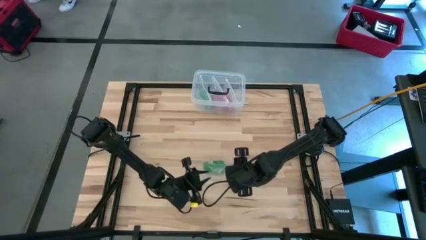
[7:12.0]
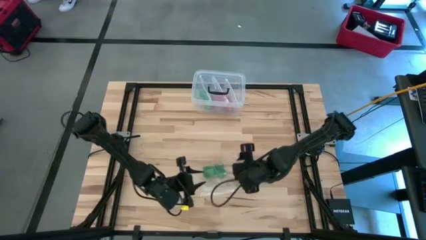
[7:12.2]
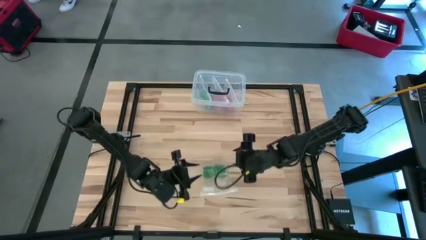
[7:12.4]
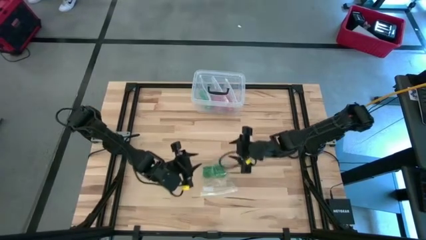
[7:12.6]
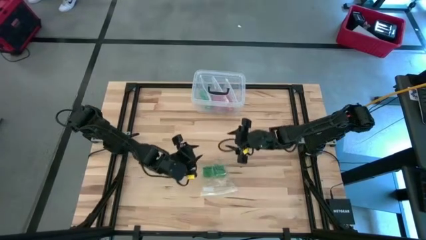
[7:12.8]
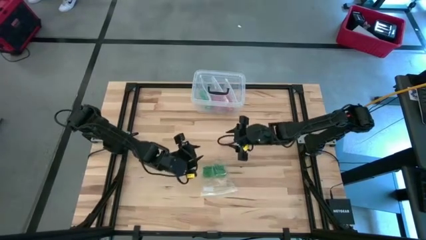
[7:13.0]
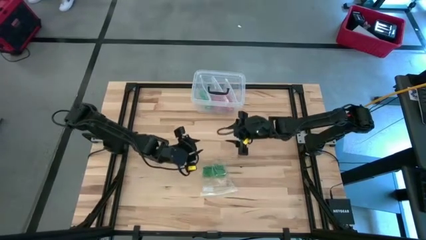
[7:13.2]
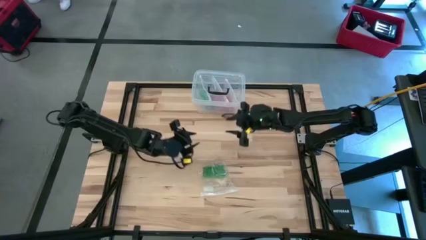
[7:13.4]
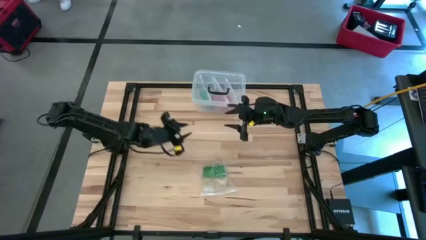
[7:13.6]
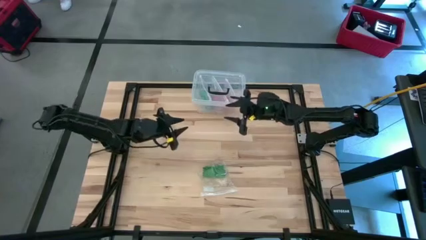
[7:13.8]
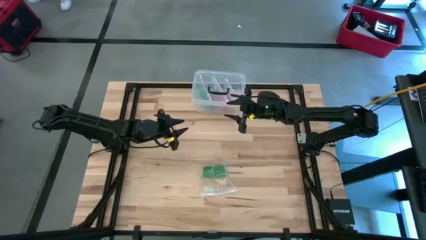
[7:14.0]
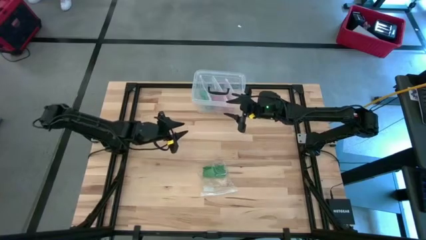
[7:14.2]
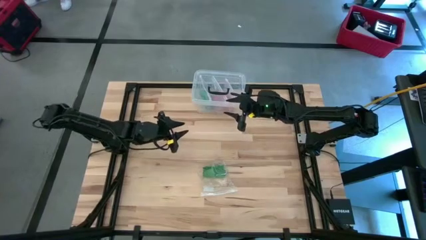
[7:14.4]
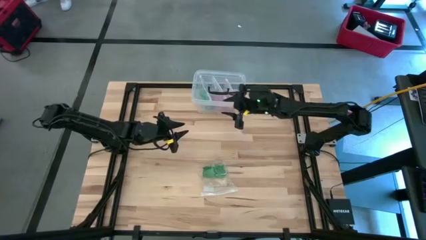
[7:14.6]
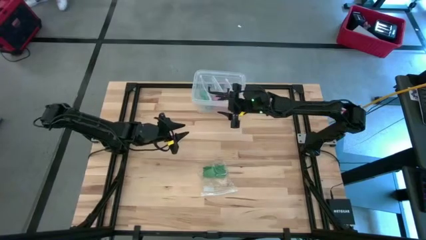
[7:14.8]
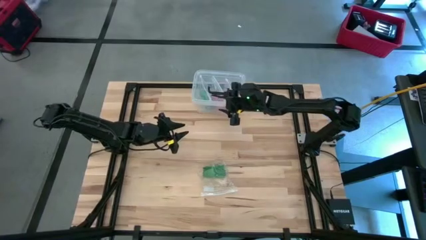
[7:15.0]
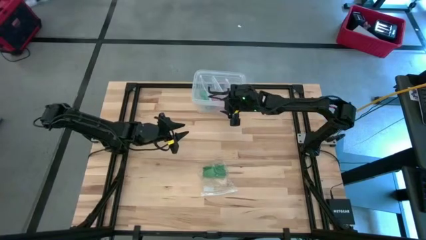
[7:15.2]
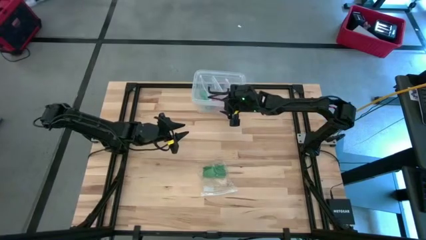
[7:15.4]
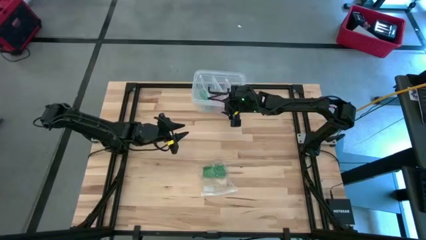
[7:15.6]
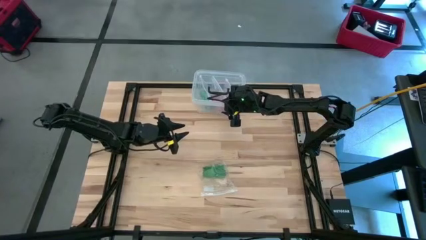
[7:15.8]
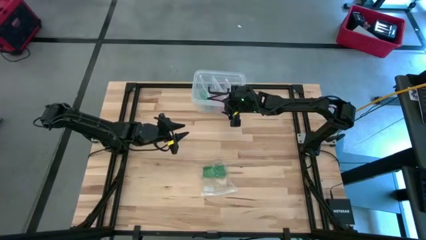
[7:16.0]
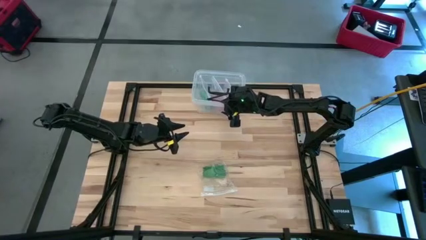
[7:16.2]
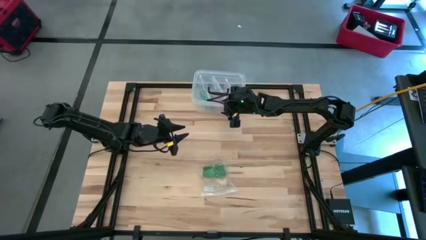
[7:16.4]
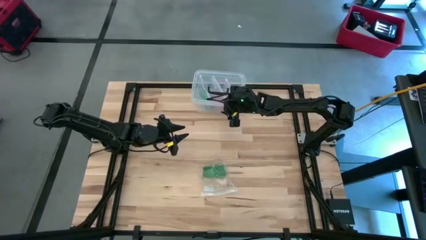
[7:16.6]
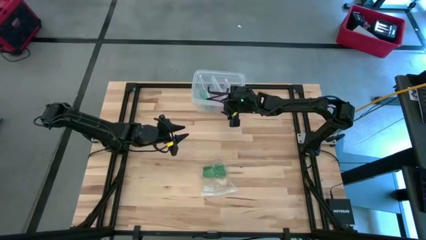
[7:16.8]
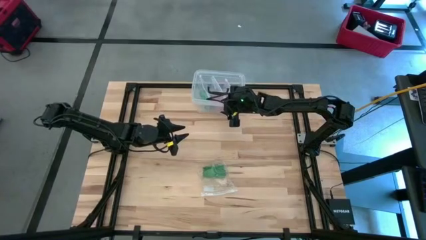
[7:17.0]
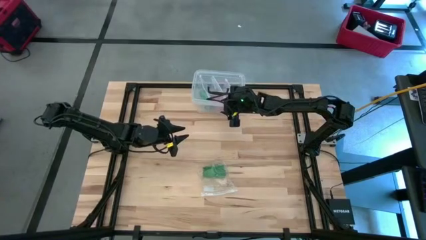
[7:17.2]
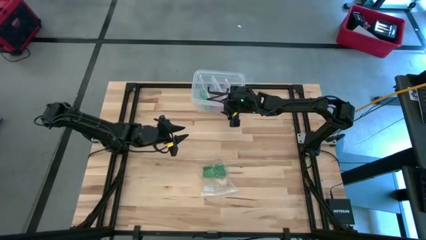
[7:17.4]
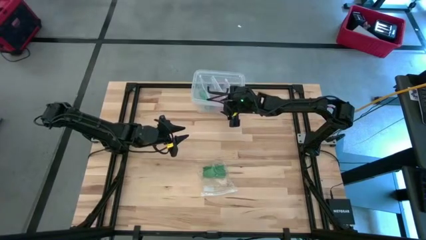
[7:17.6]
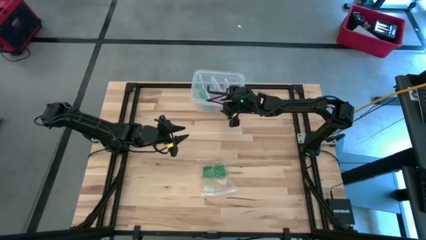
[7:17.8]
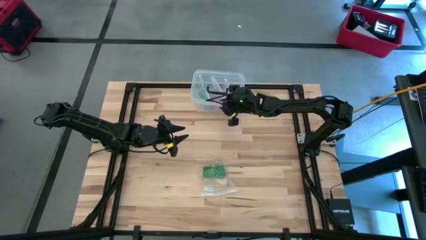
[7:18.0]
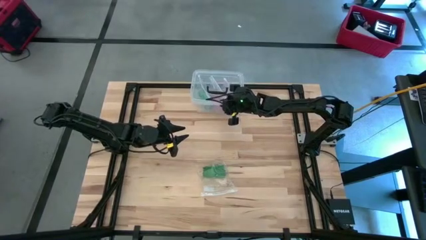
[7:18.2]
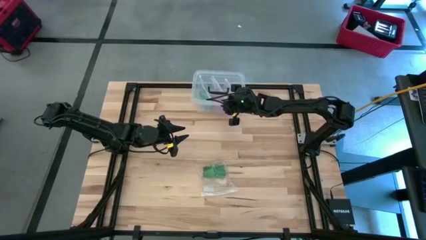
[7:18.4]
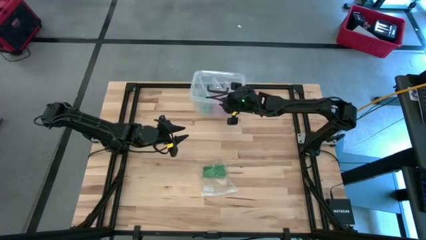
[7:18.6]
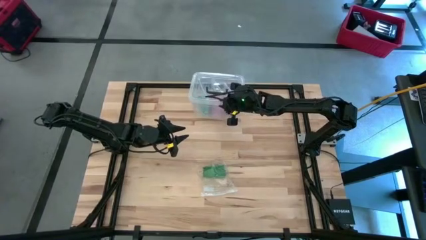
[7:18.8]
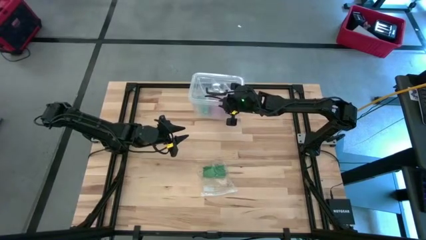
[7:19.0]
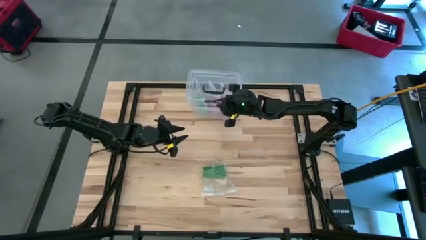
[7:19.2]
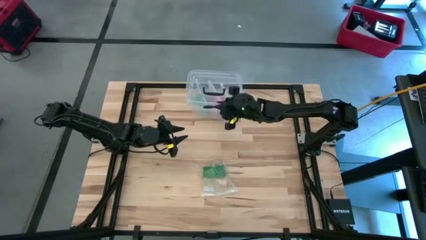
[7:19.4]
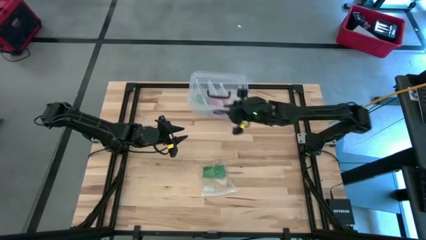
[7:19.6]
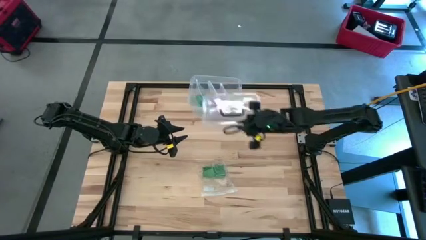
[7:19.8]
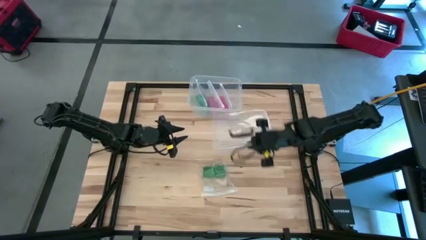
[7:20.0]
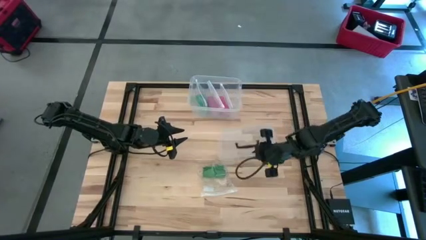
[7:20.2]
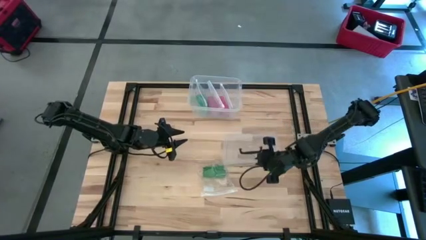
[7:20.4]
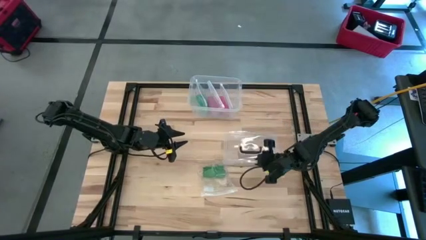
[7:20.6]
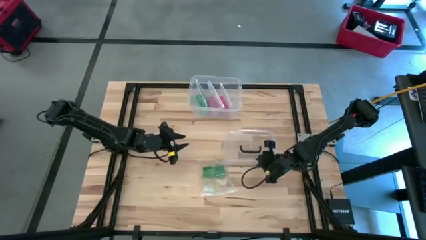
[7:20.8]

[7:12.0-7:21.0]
Task: Roll bandage
Open the transparent bin

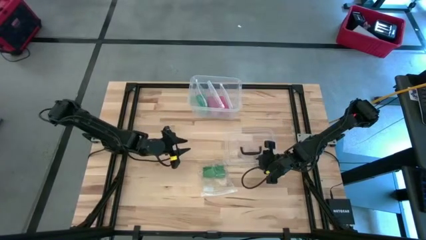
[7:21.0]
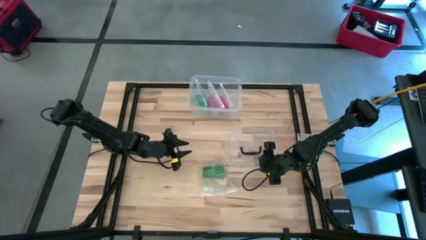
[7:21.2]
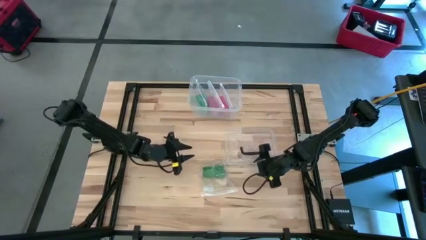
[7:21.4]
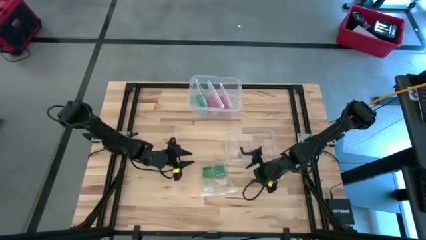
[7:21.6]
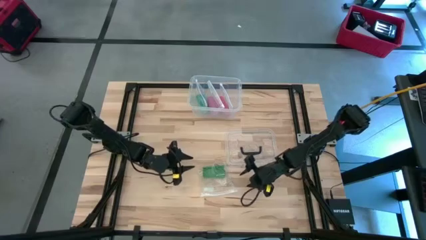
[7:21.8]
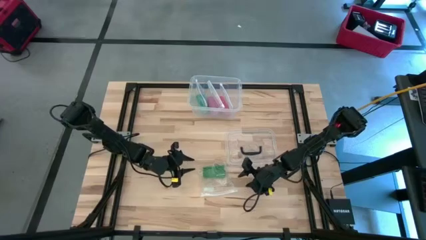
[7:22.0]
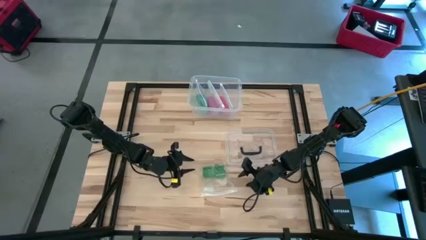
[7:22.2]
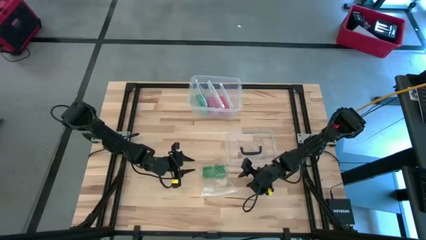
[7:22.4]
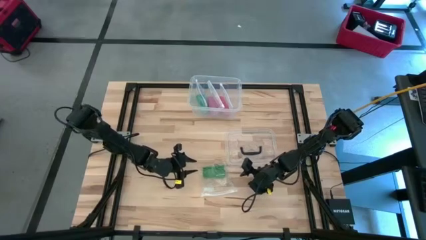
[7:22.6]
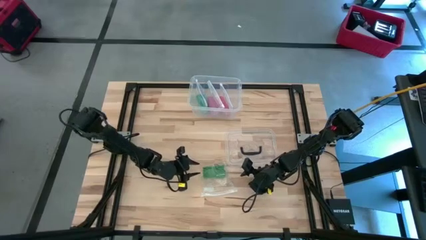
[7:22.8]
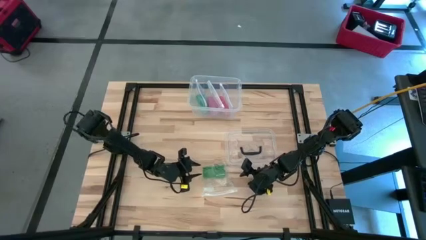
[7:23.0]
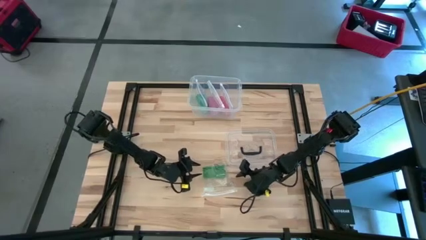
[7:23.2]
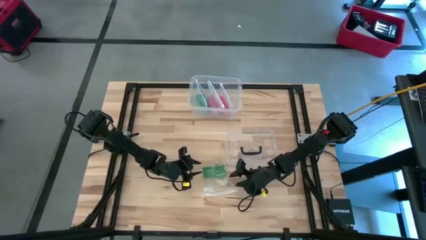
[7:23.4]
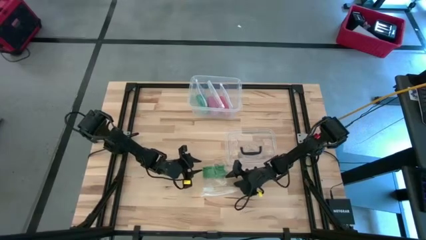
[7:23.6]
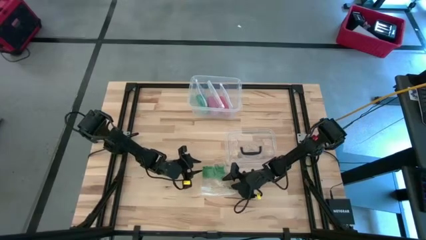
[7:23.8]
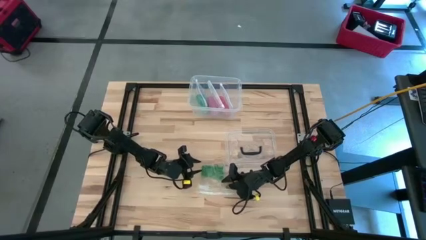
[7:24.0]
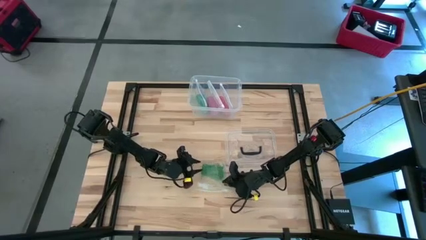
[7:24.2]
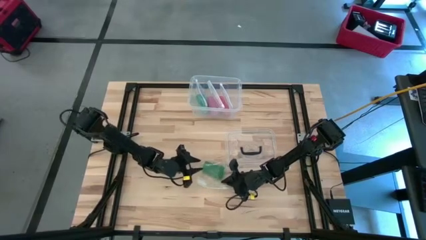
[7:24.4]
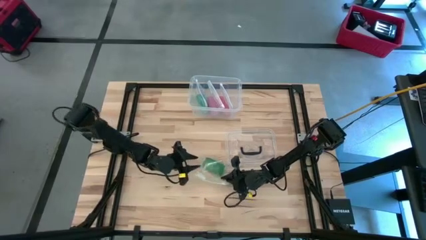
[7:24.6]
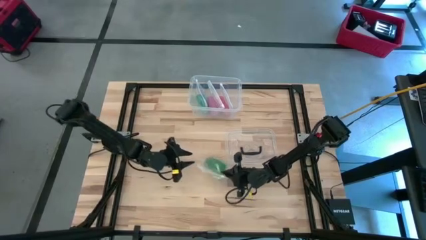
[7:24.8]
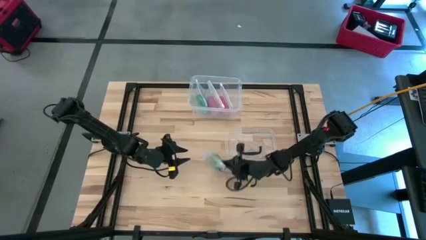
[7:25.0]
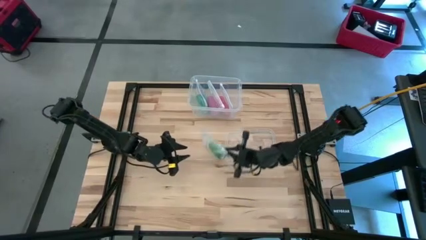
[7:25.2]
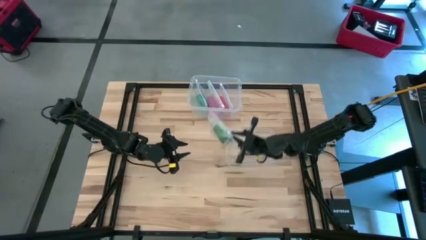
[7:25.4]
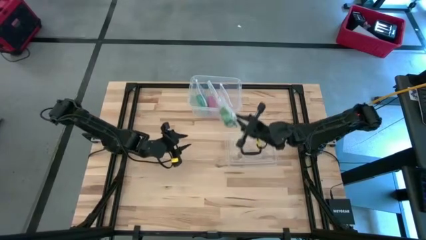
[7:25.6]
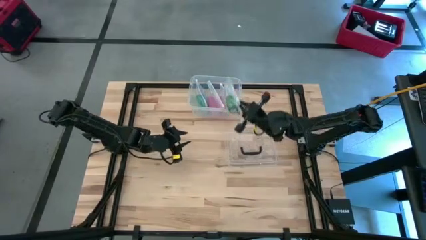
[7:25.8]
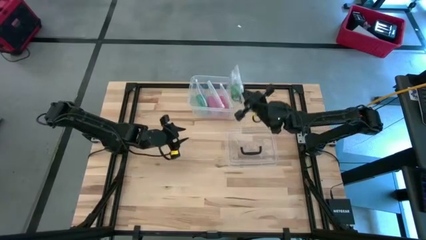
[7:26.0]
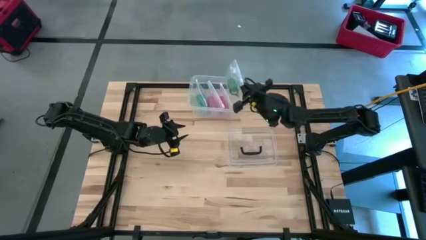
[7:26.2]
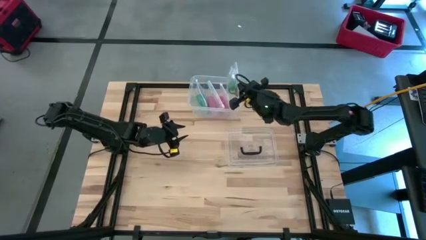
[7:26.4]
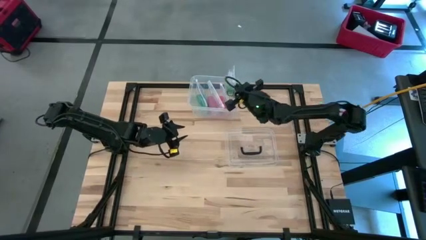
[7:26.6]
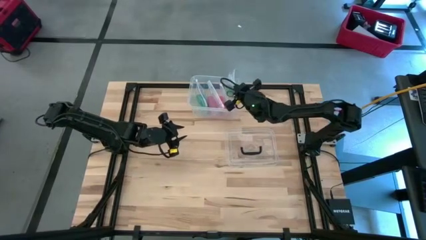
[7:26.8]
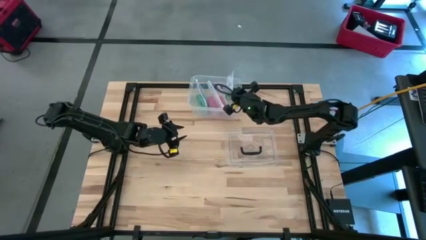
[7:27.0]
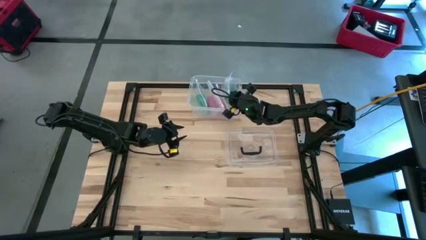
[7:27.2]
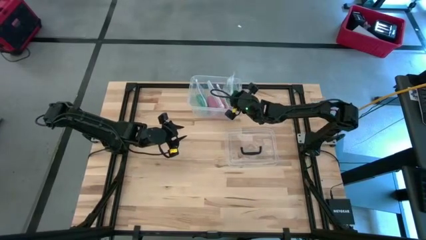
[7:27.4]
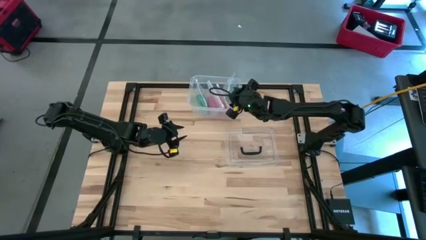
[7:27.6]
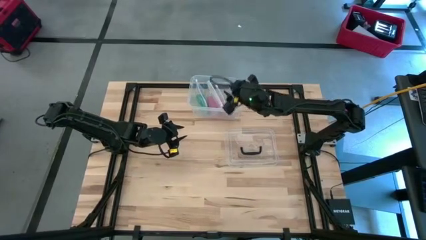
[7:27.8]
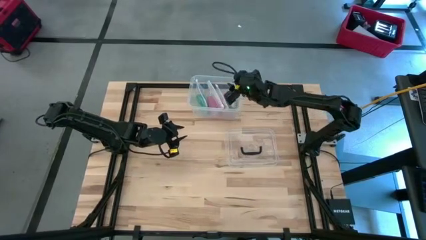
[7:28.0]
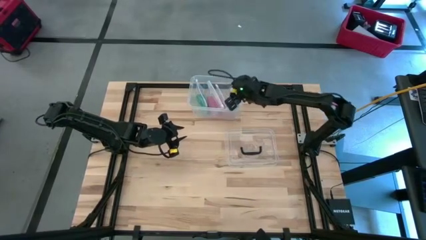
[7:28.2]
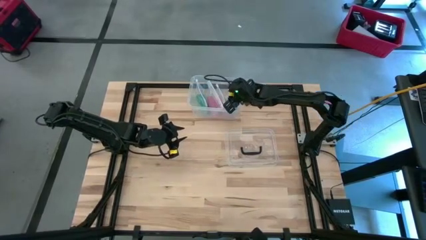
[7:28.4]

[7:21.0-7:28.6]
Put the transparent zip lock bag into the transparent bin
